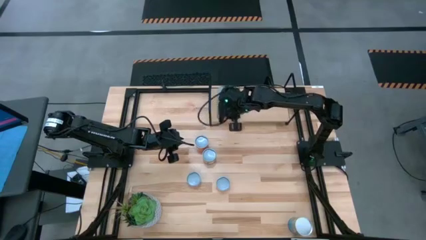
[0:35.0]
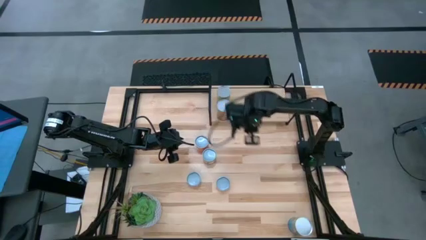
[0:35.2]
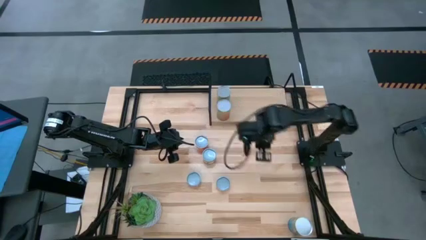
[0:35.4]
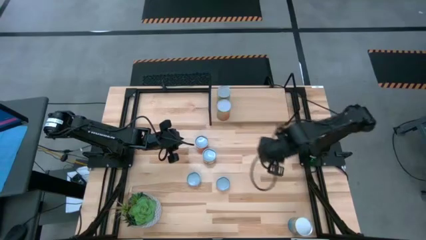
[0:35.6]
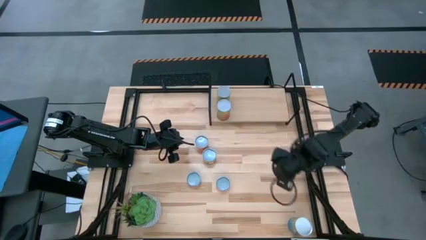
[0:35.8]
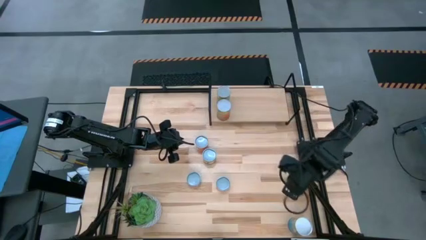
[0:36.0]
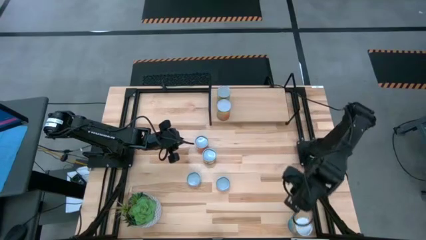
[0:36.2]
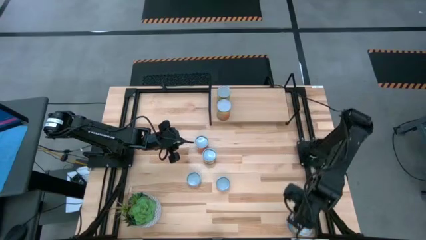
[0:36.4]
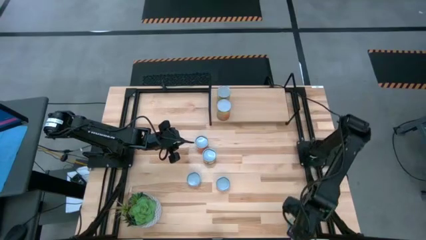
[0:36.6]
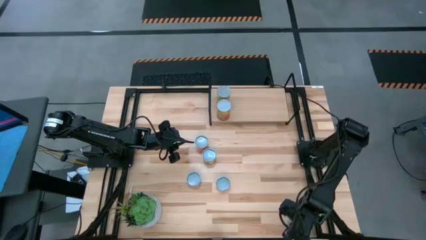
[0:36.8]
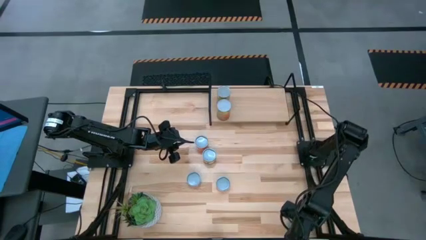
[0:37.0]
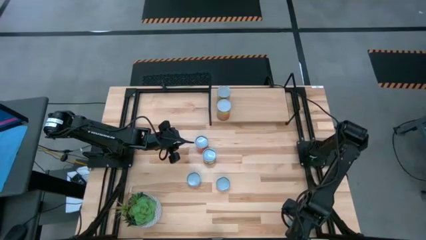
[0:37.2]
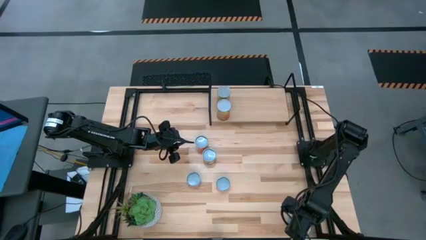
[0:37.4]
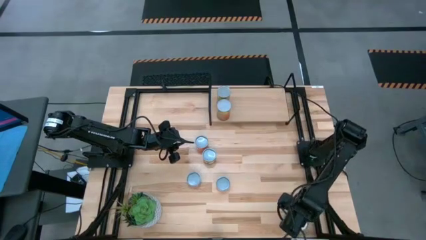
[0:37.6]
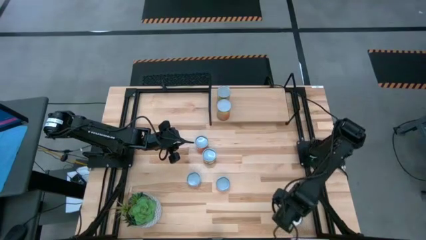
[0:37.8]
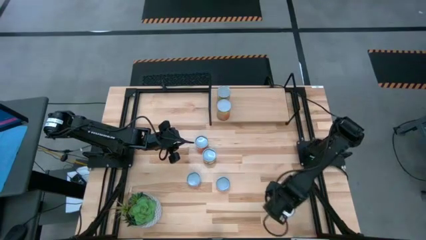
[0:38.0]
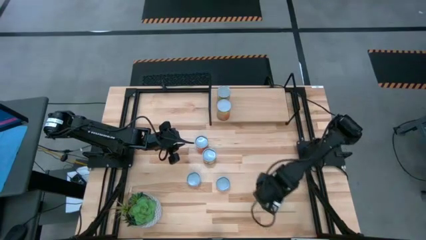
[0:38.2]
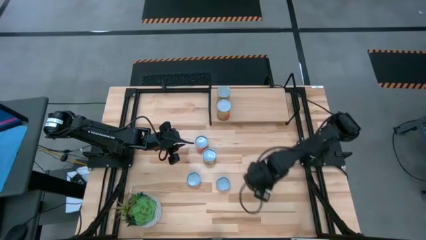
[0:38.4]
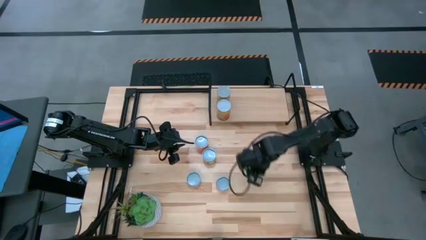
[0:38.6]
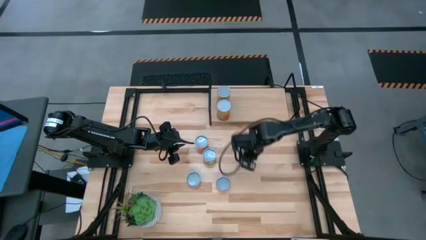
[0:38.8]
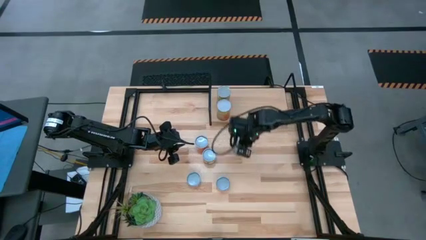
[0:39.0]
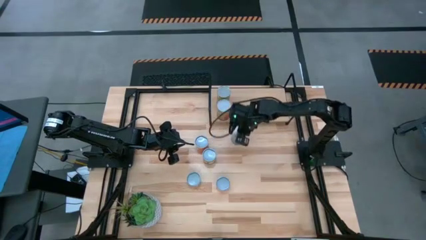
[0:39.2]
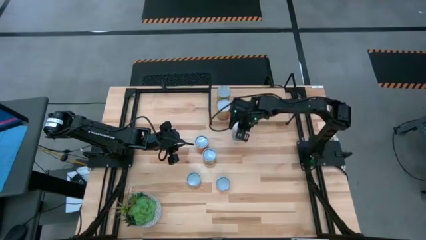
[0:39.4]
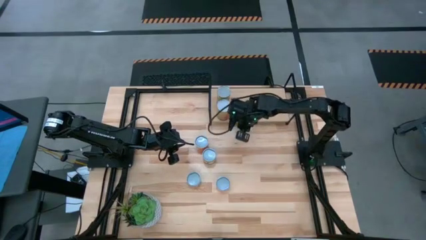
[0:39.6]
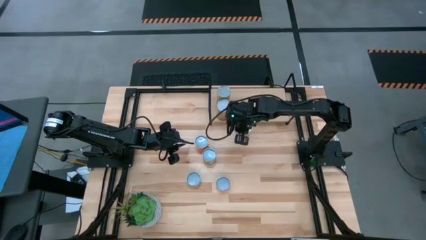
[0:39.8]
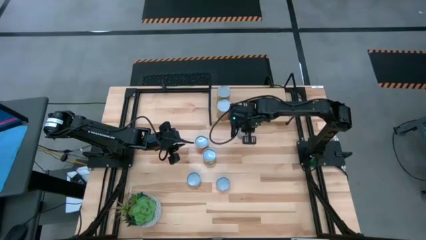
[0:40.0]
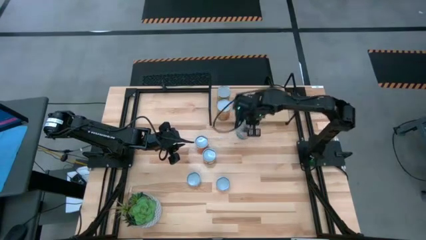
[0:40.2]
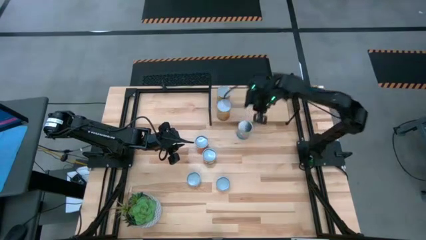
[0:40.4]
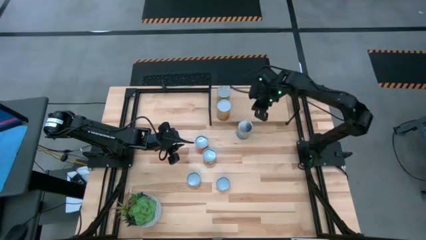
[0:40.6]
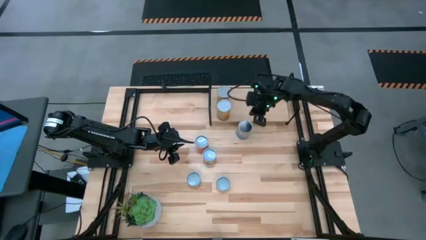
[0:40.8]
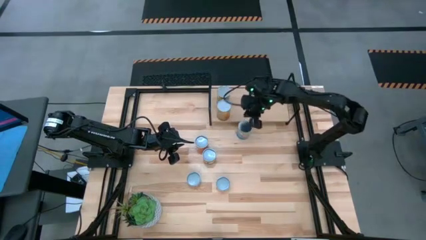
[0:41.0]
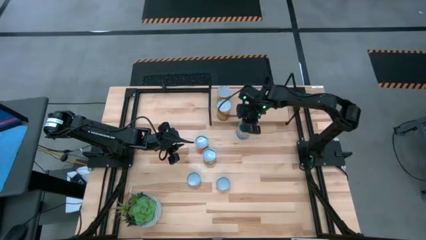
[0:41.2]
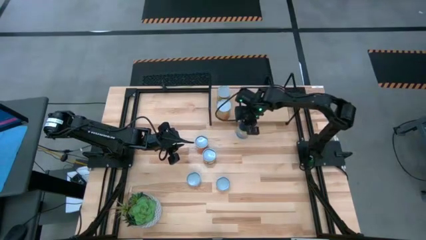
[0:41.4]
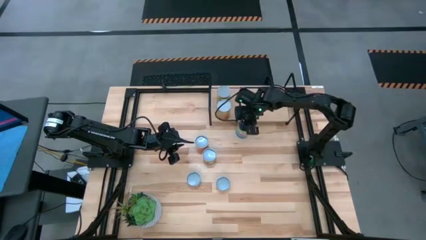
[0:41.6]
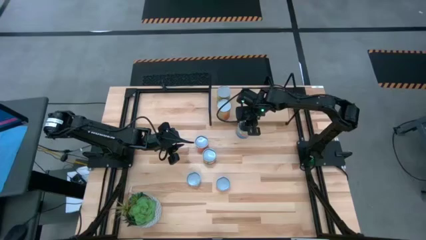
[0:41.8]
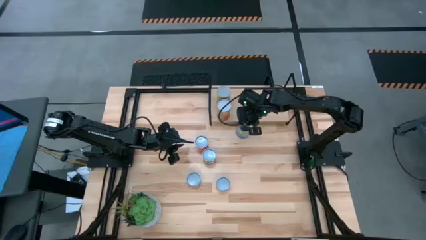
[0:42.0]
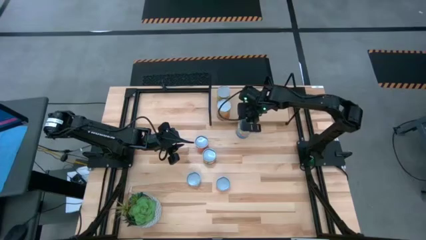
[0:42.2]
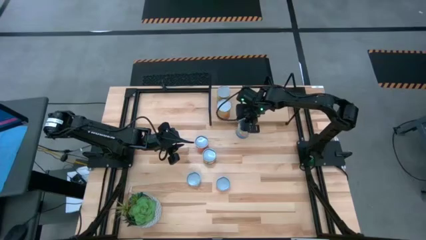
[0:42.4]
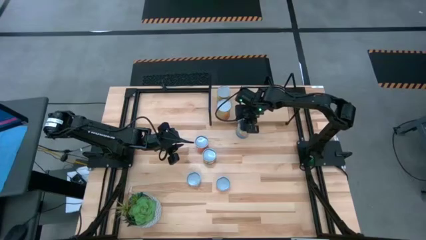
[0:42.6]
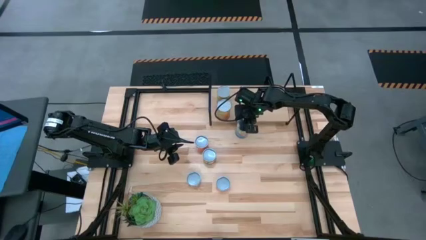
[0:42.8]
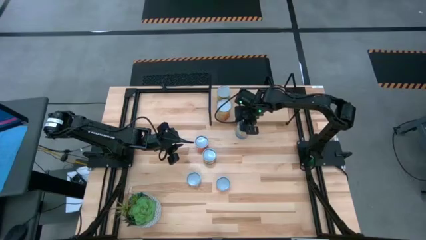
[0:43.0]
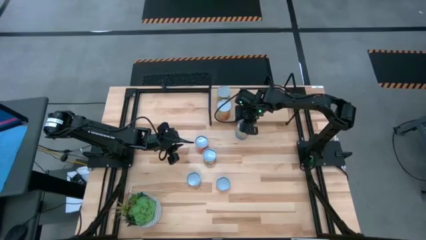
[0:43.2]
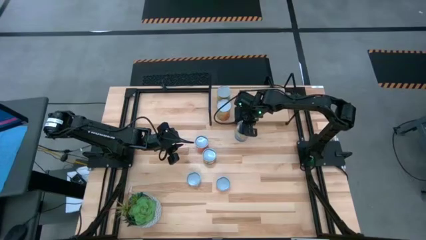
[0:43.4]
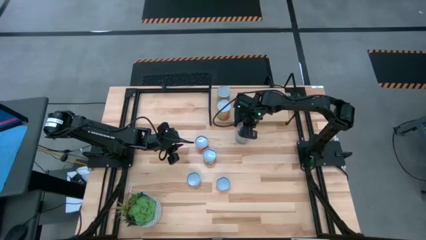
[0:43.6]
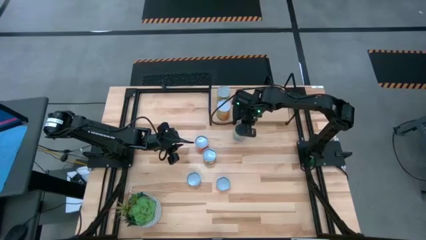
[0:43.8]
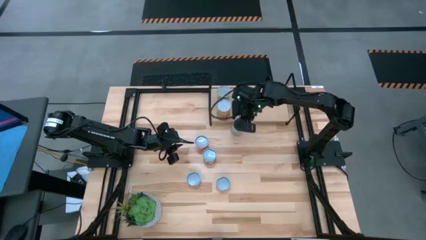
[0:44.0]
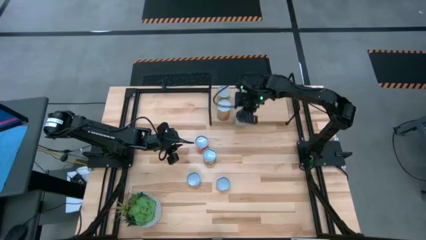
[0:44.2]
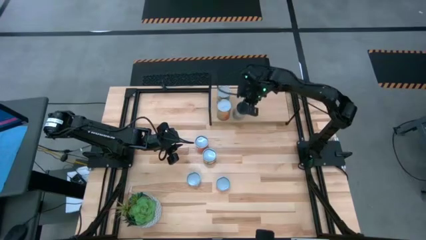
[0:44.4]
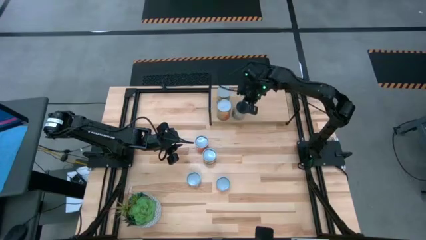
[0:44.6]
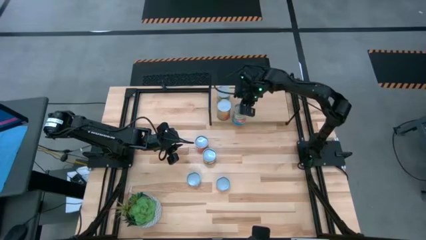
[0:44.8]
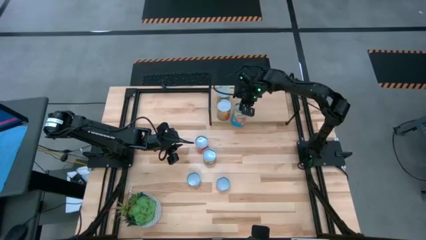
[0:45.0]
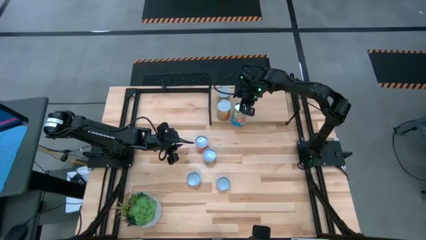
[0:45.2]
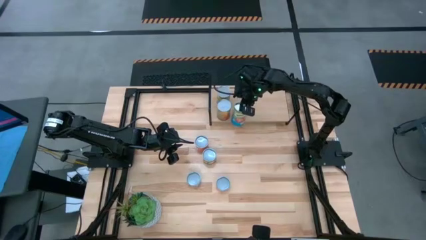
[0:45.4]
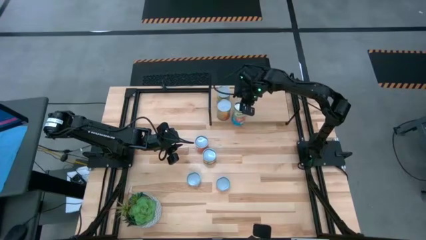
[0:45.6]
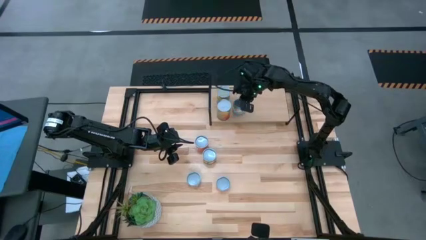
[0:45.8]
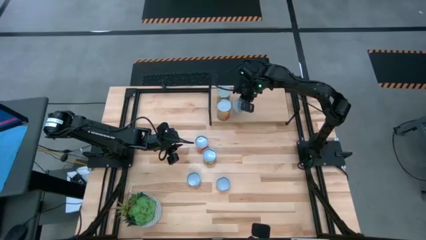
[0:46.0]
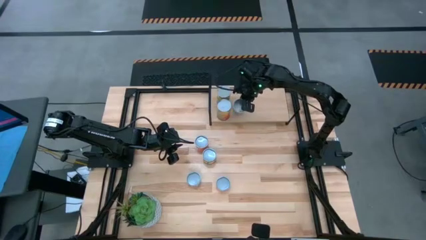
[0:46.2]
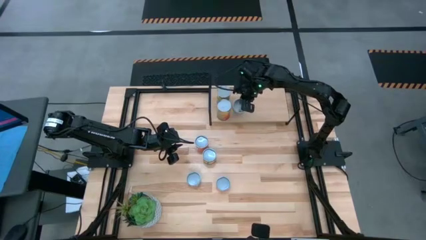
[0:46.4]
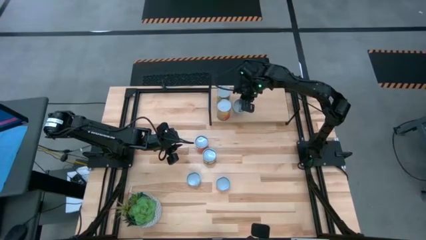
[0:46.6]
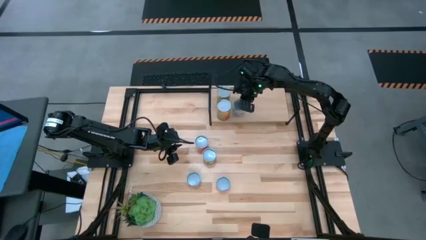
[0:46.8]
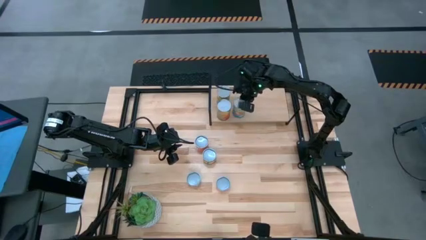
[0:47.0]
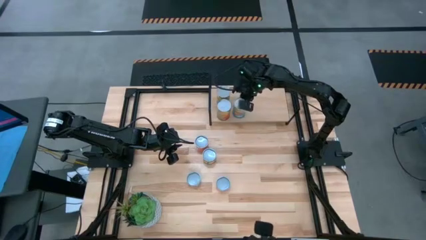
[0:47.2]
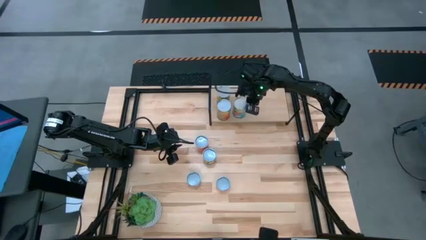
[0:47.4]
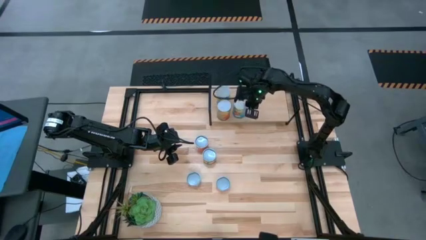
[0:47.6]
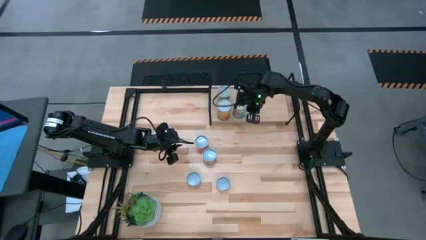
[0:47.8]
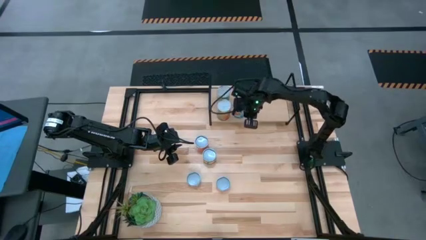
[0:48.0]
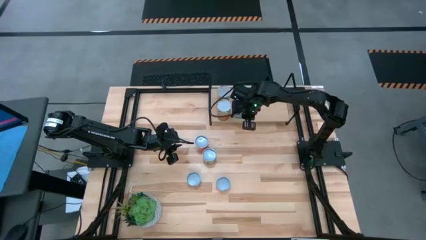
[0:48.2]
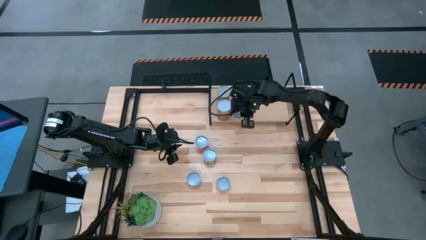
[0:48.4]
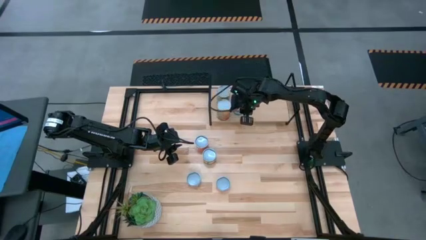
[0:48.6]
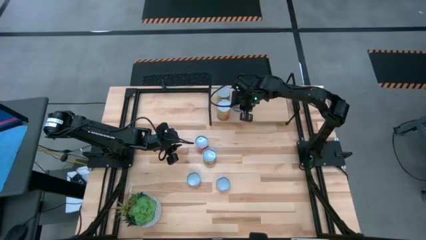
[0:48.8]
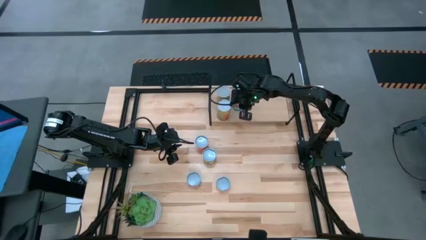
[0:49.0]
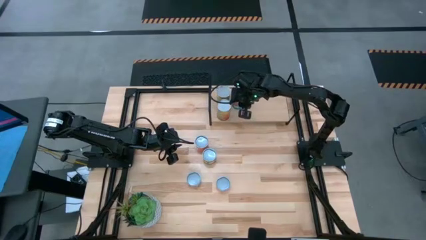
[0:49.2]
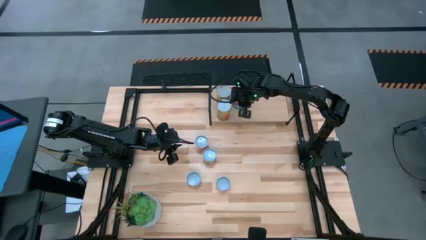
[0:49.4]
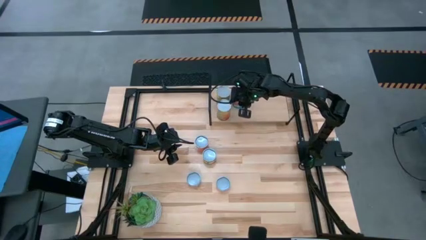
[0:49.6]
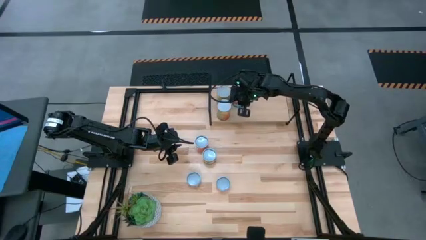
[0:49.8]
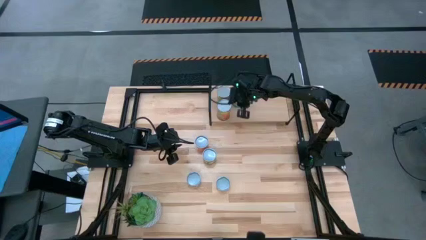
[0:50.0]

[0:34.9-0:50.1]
Task: Pick and place cans onto a shelf
Put the canned tomatoes on the shelf
